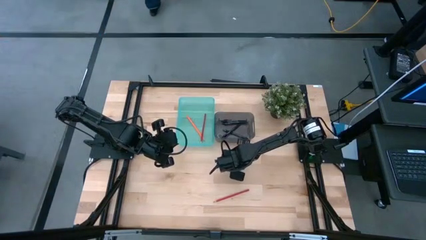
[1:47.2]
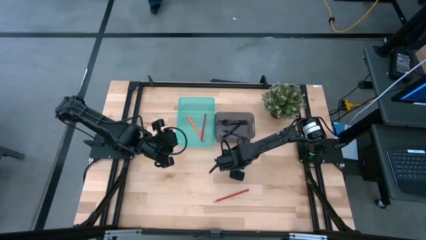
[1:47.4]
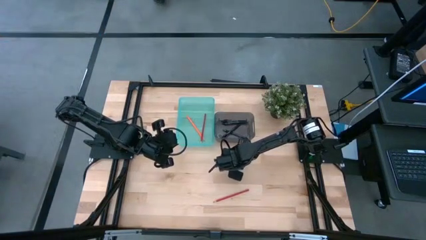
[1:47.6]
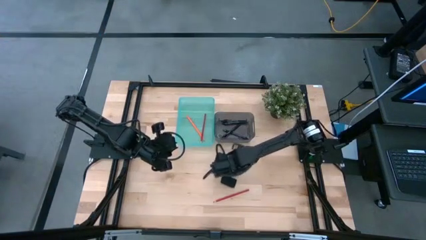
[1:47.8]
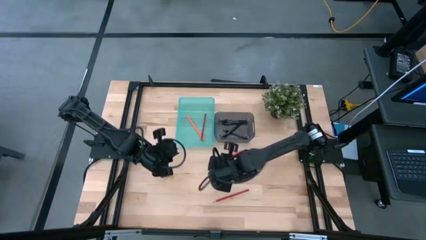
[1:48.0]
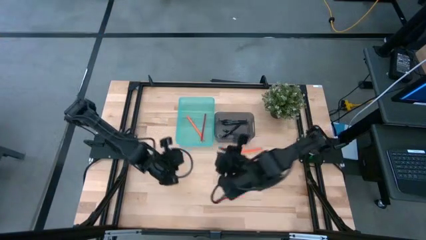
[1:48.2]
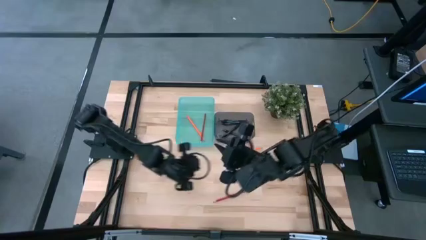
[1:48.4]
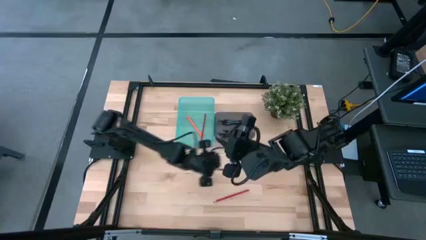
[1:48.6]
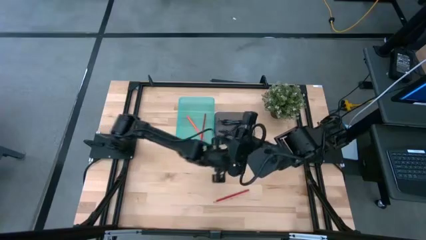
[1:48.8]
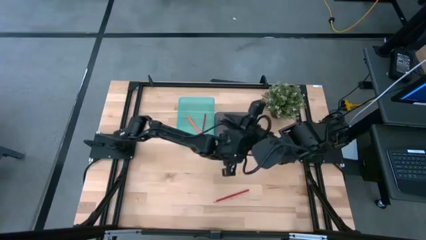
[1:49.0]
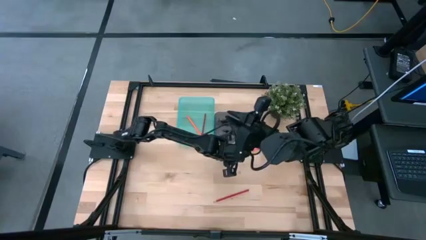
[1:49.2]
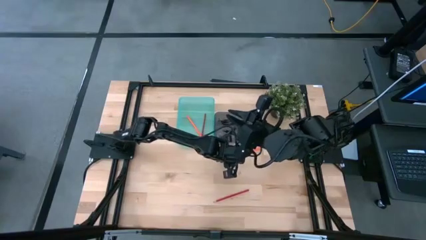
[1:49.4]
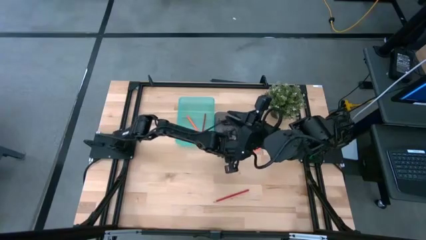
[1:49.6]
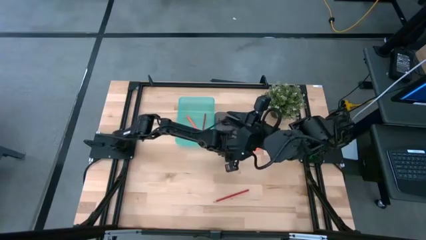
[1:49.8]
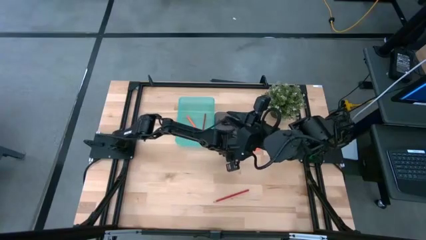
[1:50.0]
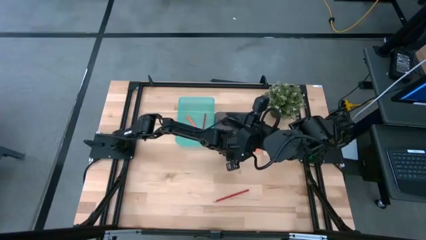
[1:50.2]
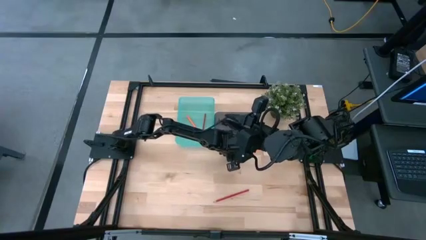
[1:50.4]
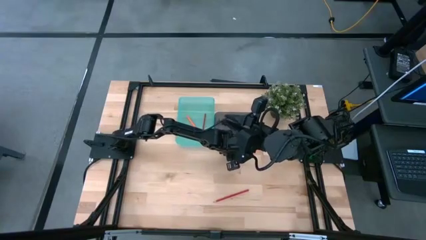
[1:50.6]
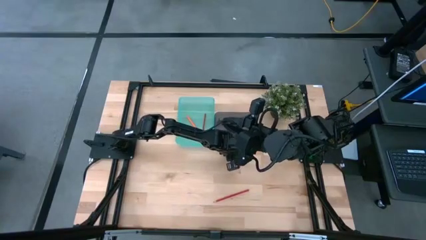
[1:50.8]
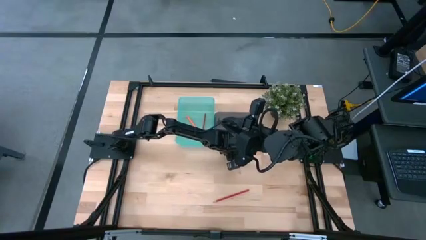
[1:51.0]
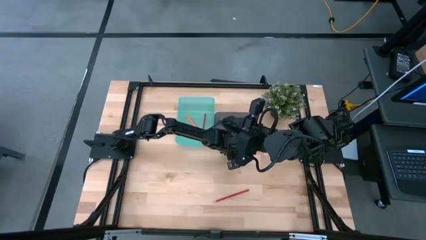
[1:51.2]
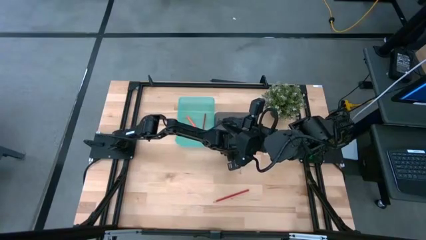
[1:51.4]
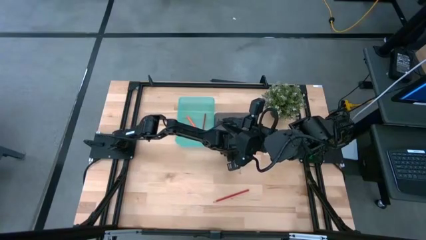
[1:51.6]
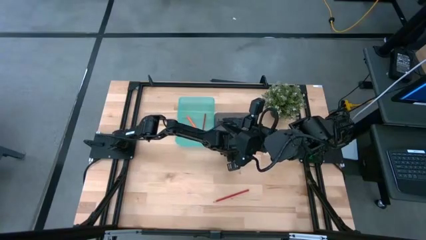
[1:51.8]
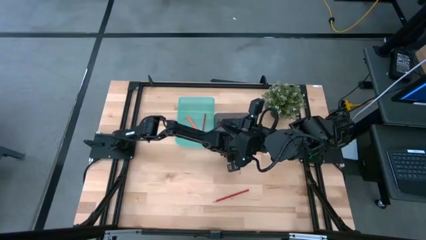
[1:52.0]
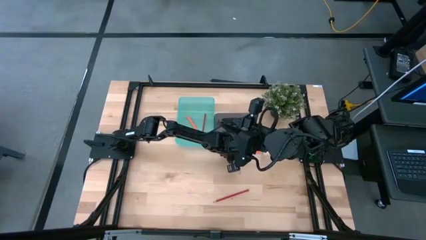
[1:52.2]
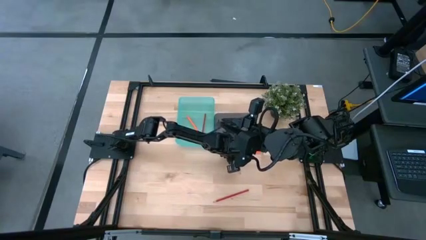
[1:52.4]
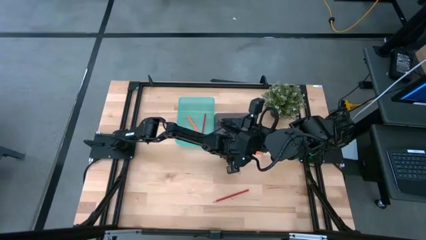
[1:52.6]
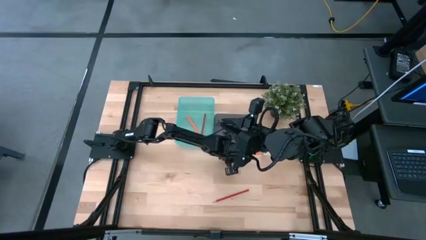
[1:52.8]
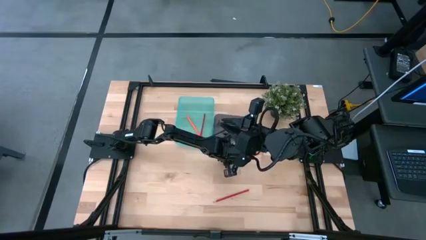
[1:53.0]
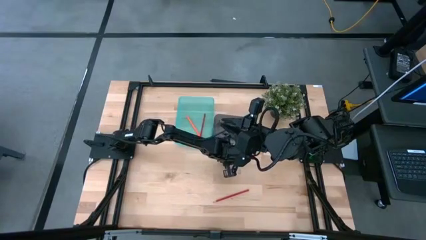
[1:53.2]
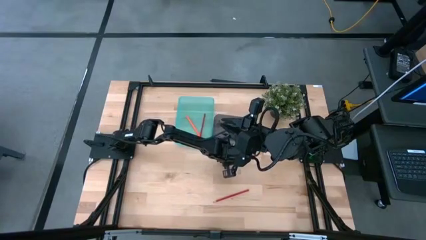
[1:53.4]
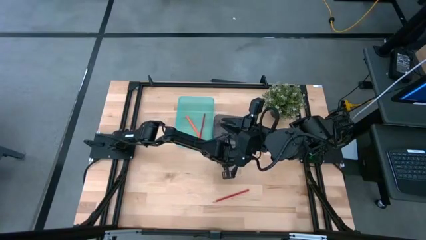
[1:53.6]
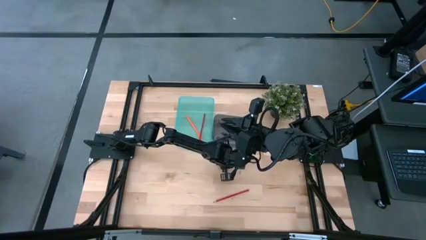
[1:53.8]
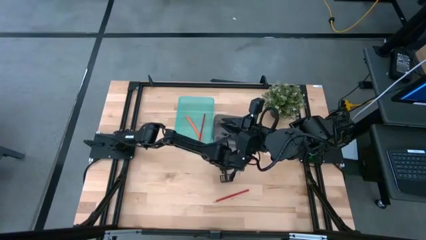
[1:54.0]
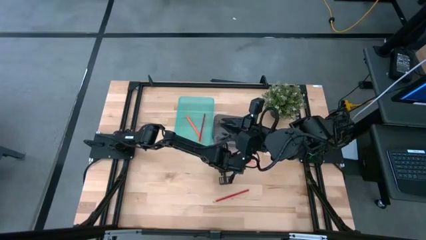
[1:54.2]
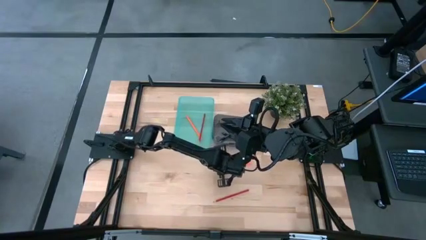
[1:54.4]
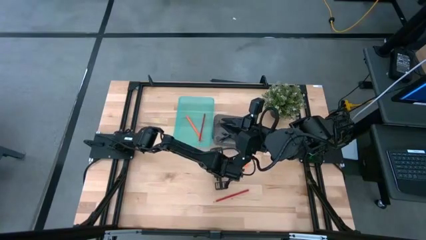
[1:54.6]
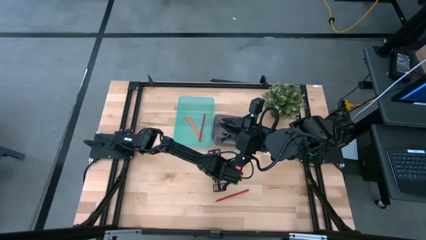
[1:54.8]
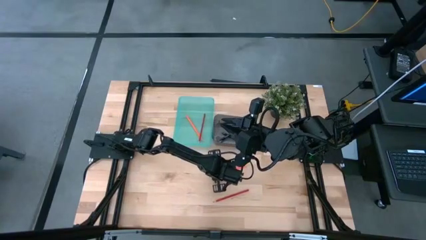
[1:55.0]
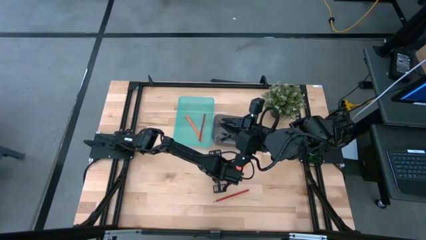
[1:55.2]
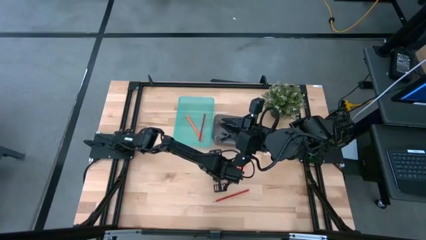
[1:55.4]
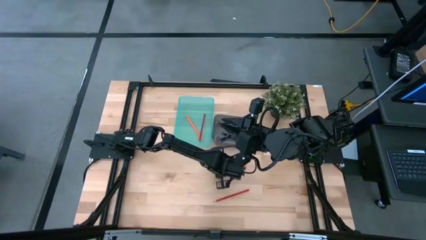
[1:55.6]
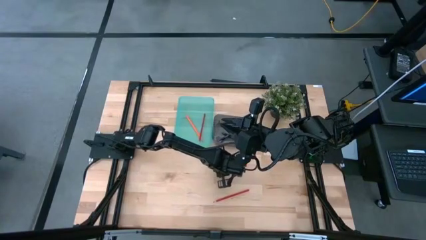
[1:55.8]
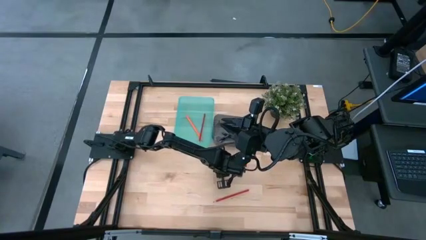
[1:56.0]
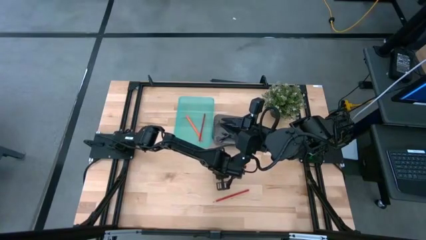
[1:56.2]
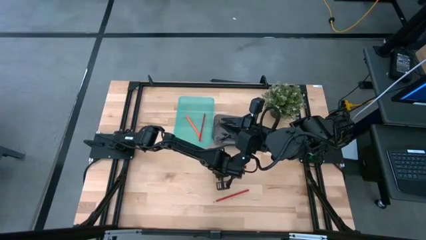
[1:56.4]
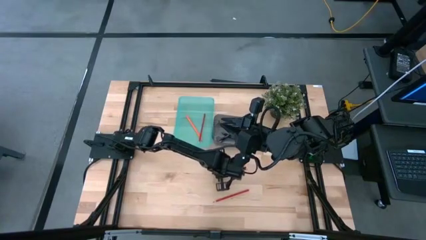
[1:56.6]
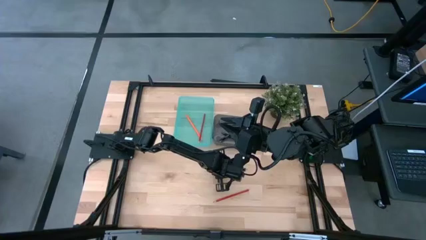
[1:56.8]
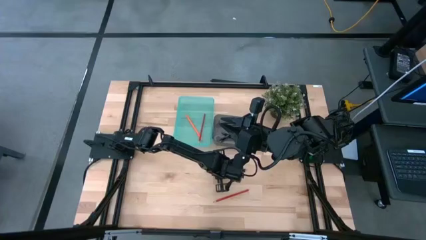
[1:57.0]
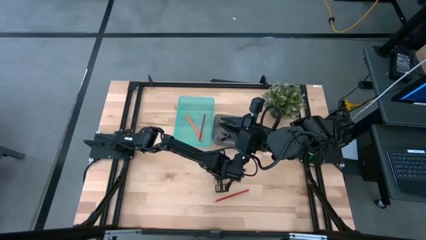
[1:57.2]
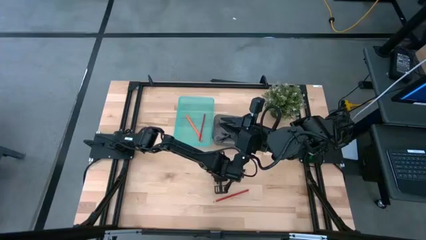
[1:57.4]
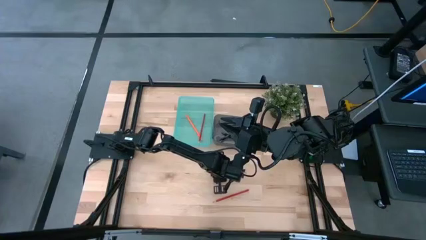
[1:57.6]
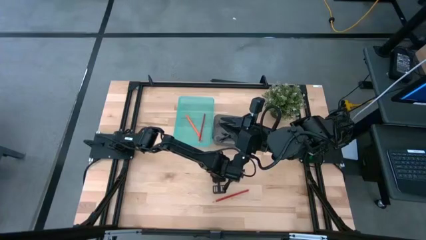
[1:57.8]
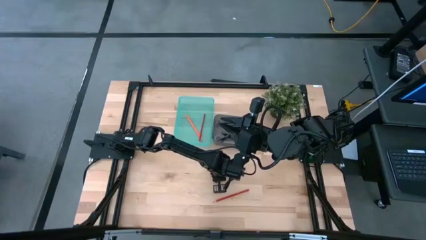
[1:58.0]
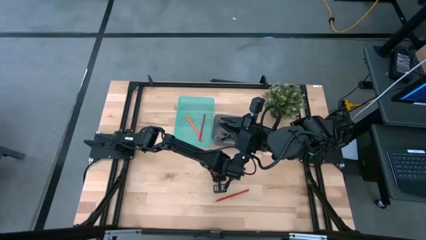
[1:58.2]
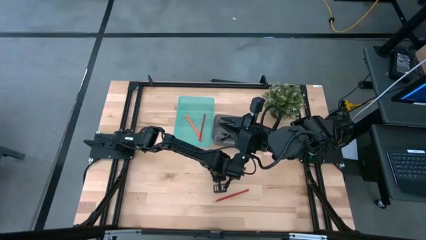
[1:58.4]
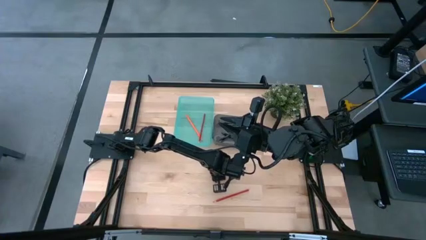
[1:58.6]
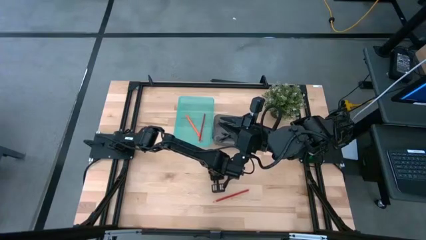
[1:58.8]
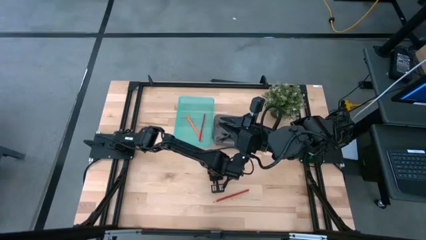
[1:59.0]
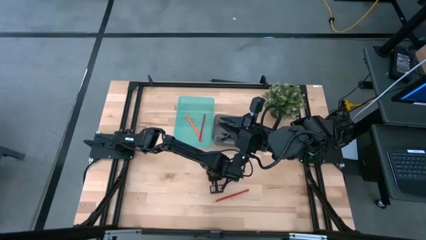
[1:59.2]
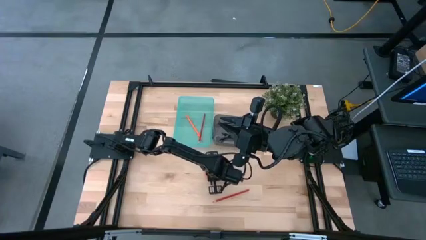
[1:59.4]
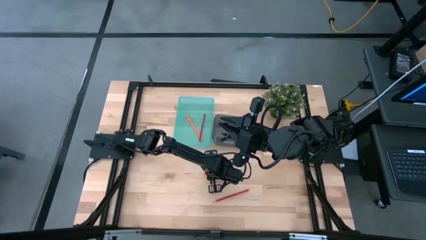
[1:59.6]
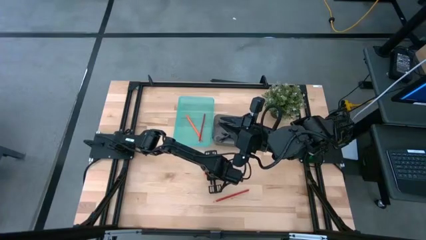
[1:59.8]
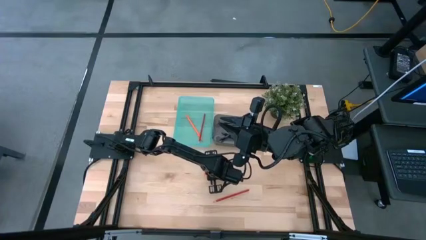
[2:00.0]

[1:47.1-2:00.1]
Task: Sort pens & pencils
Put the orange colored pencil into the green bin
